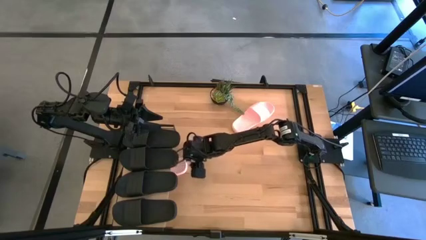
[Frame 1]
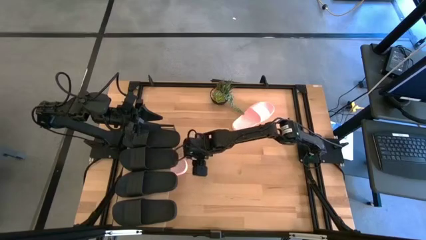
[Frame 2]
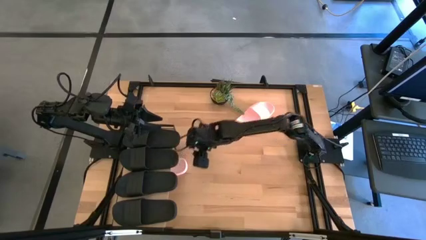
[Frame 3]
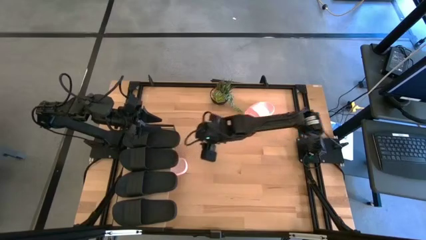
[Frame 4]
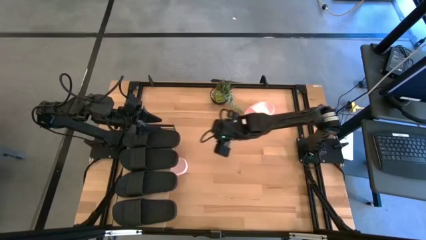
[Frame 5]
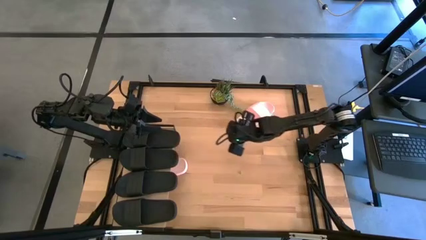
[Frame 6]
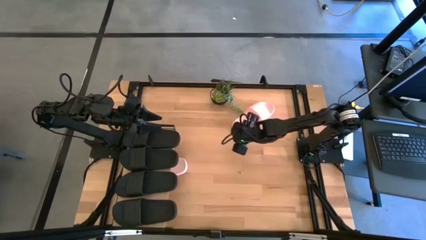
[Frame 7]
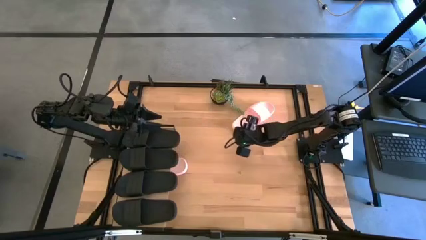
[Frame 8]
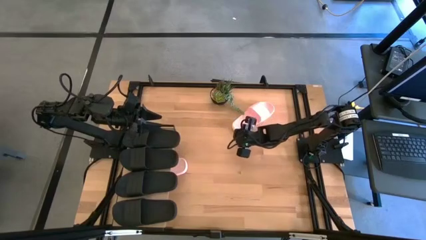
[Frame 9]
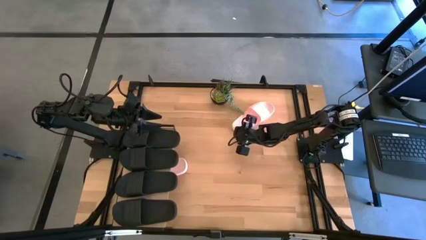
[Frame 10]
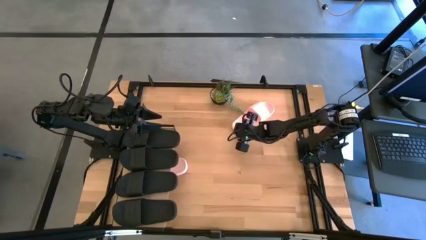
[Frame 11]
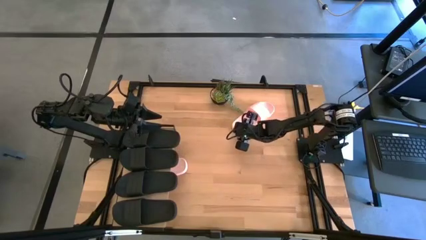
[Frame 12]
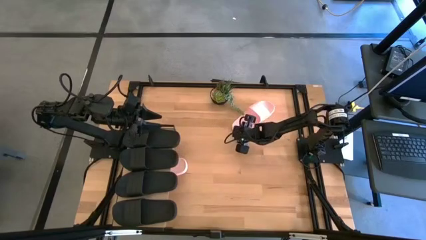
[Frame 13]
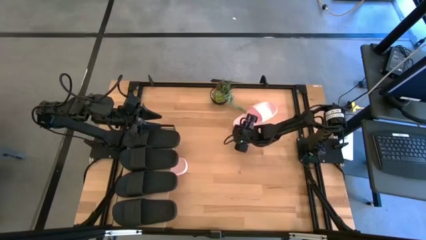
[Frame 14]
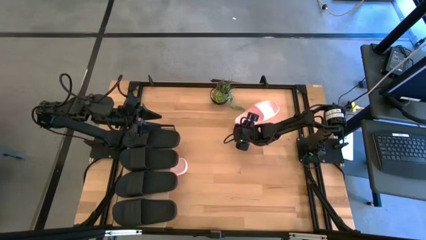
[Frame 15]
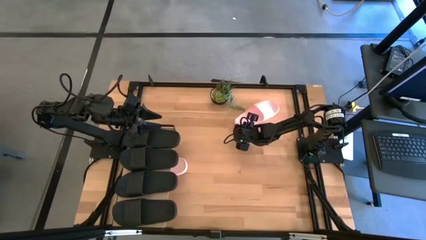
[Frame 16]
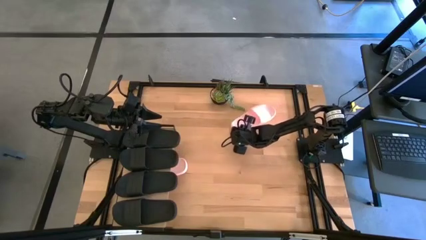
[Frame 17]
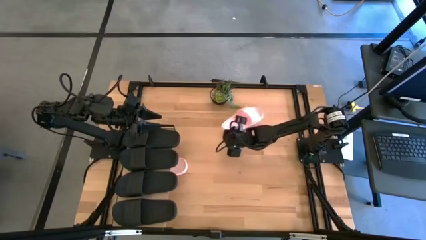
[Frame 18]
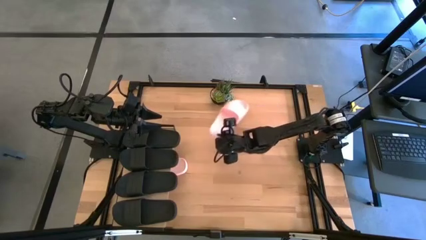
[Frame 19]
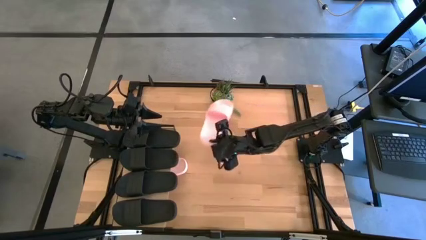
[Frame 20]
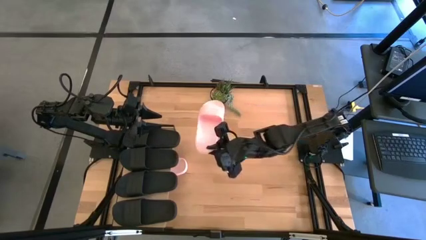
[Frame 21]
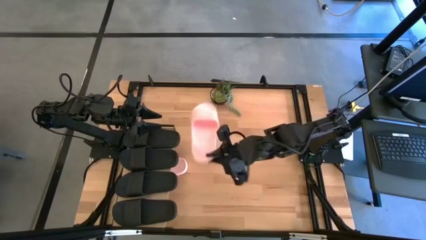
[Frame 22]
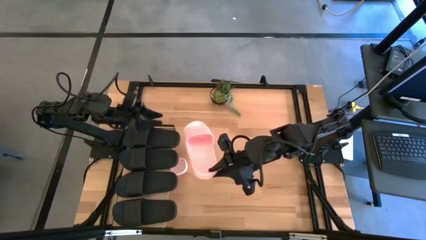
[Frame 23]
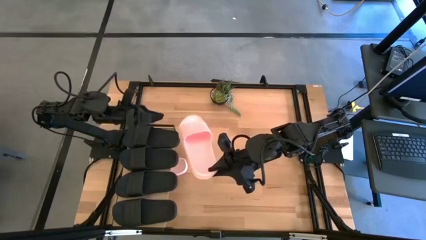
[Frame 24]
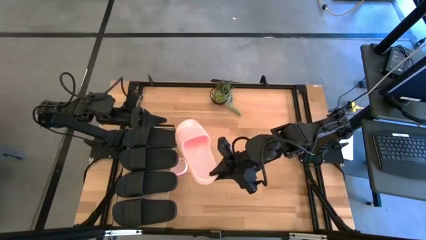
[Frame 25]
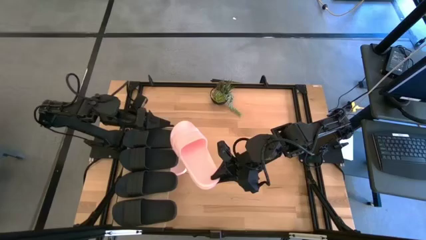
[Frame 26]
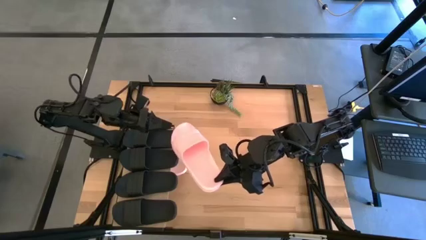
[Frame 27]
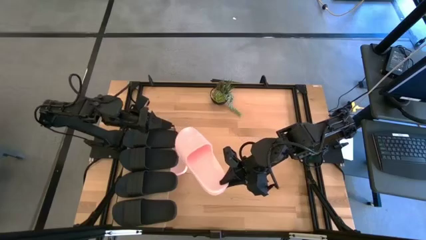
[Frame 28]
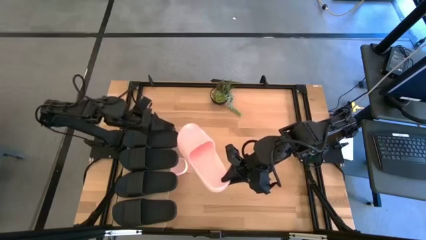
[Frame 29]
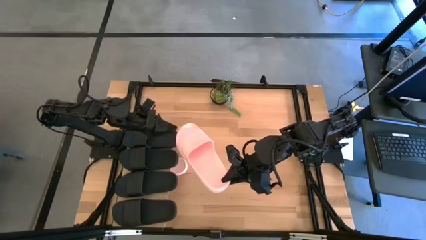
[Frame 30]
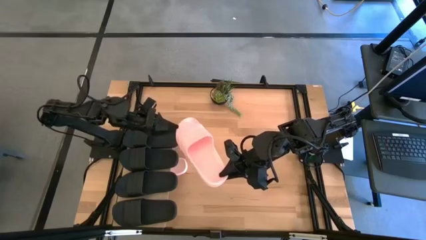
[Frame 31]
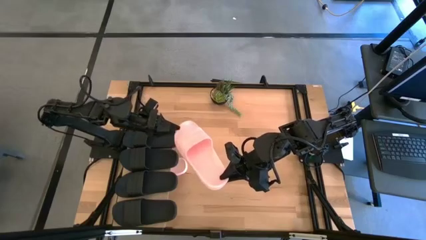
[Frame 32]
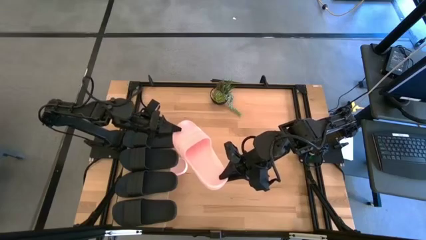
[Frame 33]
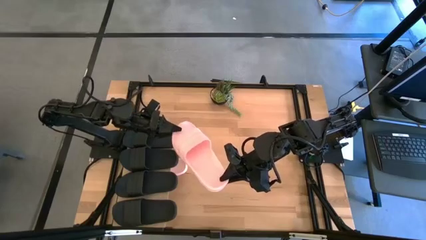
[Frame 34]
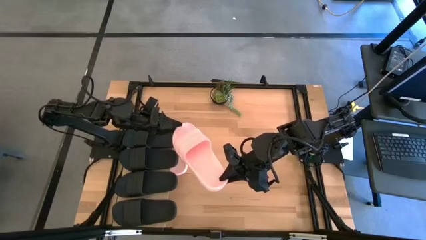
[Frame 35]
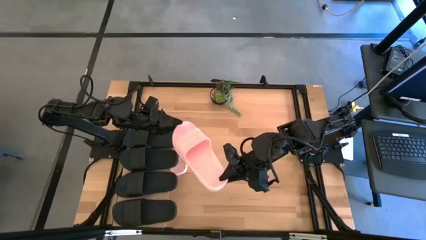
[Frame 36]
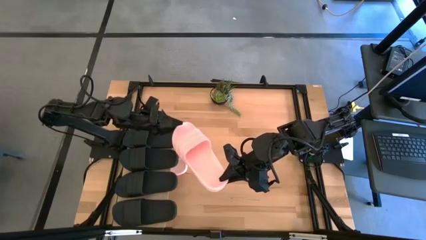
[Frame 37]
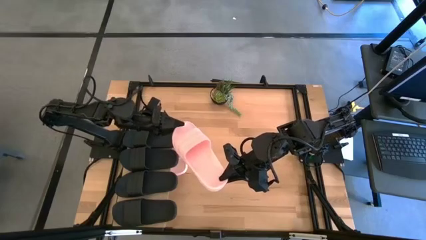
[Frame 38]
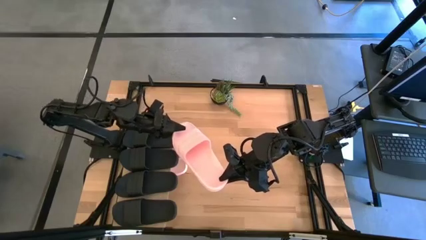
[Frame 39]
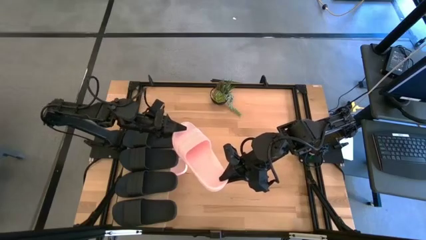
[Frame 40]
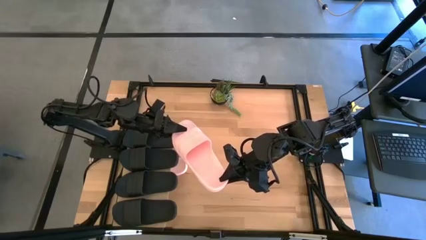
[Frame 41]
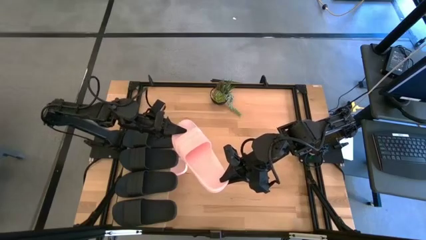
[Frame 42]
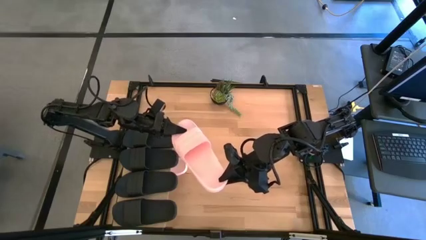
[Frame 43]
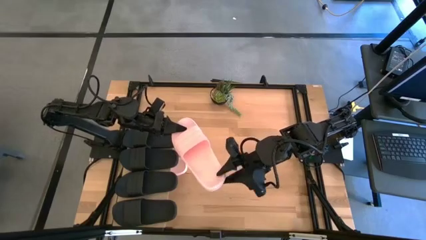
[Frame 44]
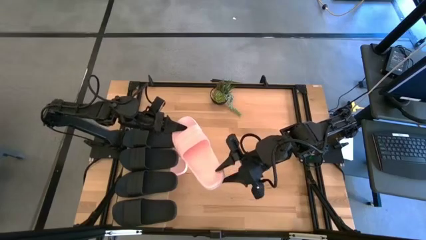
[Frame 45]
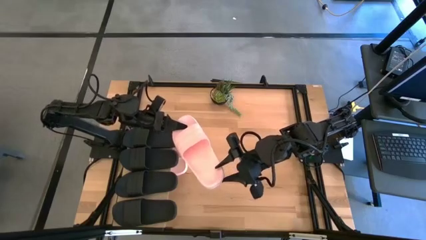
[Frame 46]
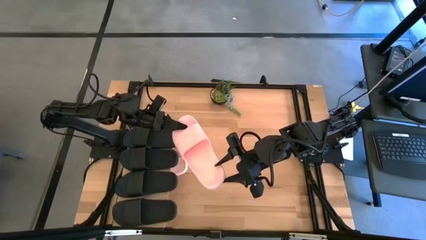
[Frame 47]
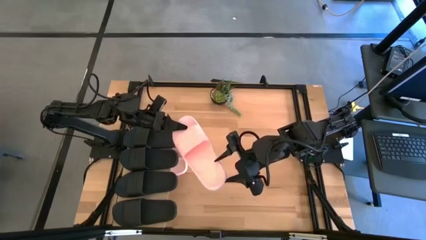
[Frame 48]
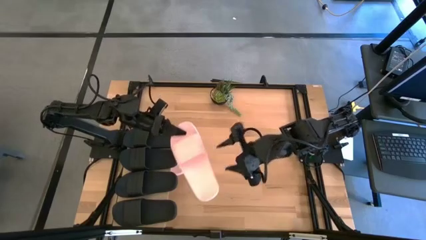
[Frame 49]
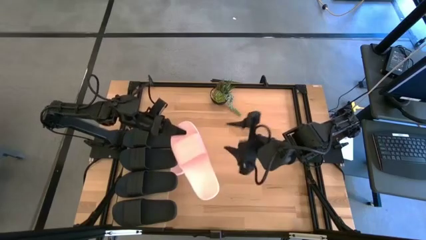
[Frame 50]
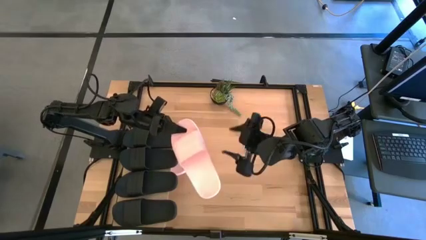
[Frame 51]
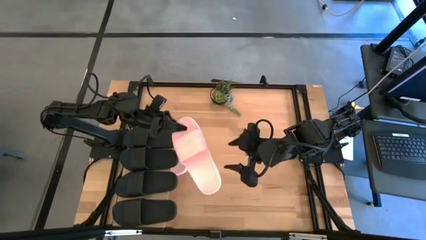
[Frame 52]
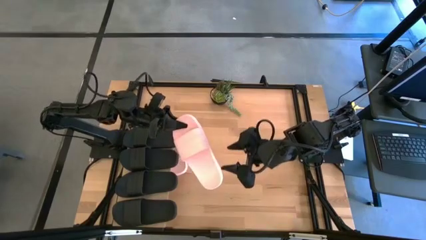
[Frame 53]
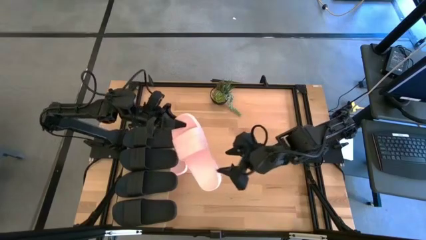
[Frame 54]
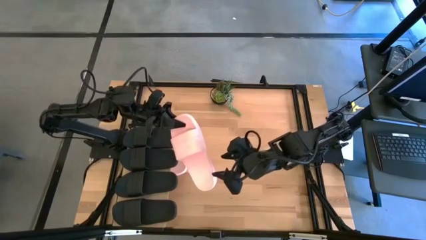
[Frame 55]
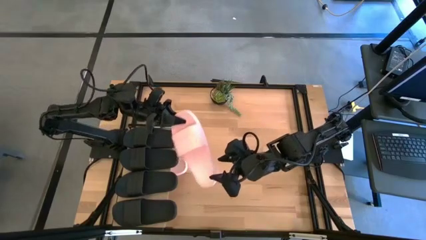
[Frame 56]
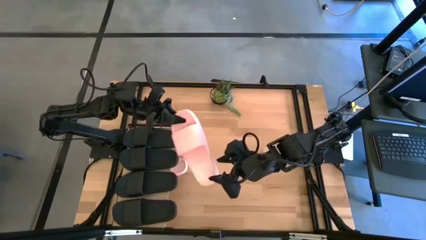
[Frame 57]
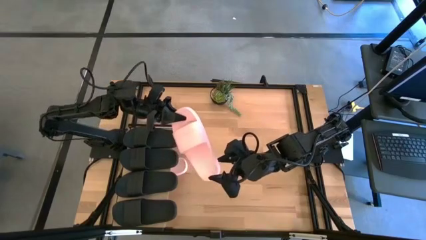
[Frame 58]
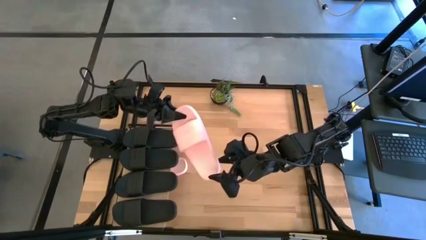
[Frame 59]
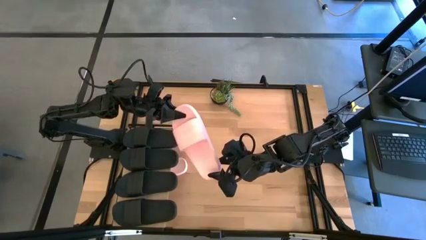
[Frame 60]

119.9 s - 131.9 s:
Task: Pick and place slides into the shelf
Put the pink slipper under the shelf
